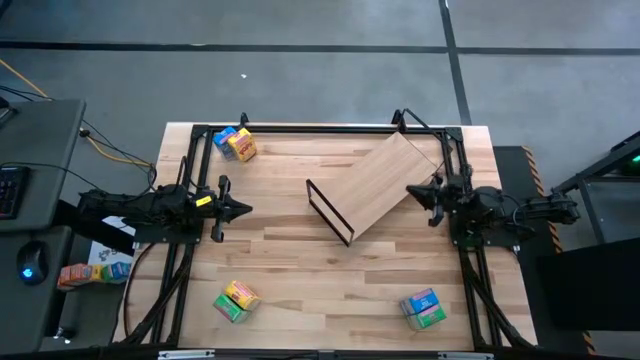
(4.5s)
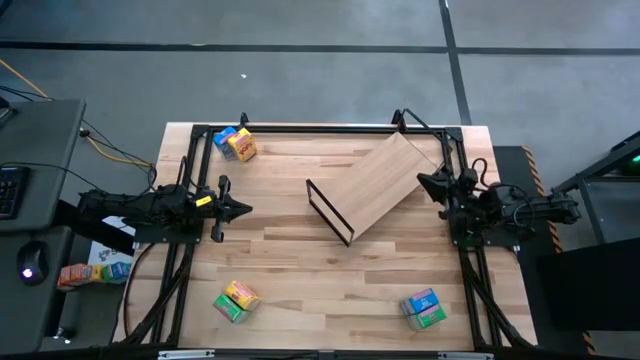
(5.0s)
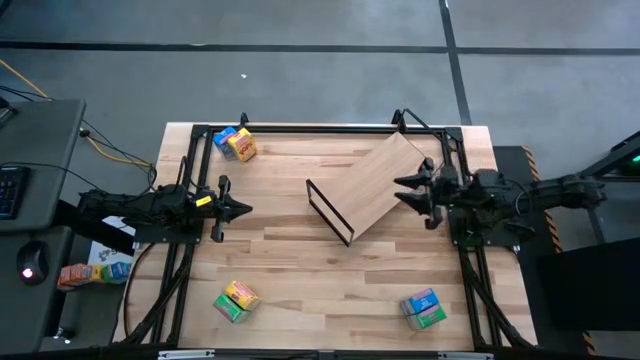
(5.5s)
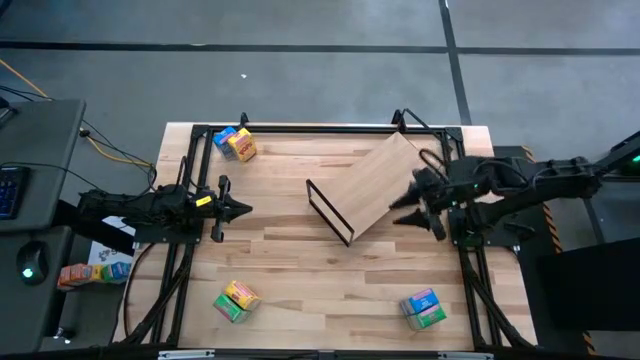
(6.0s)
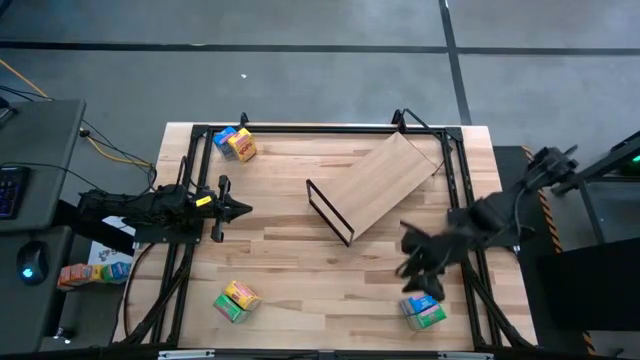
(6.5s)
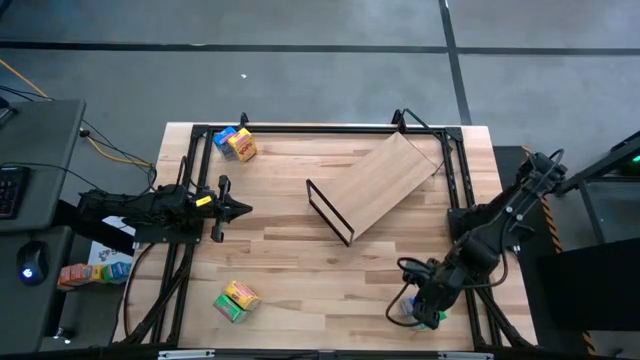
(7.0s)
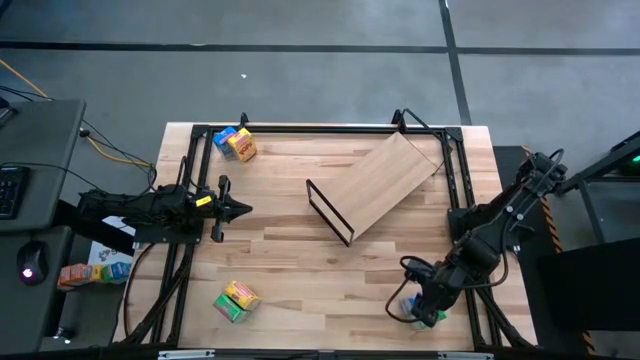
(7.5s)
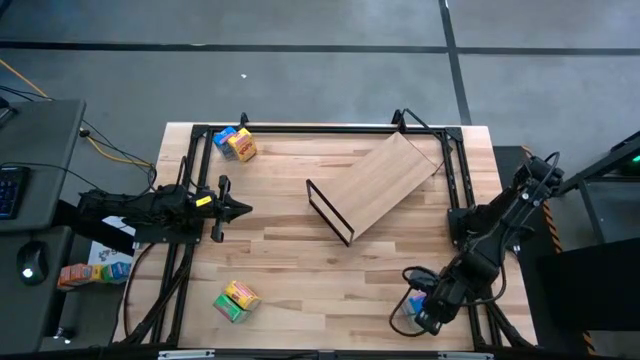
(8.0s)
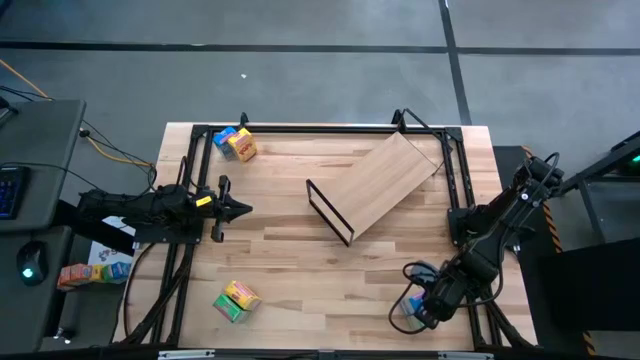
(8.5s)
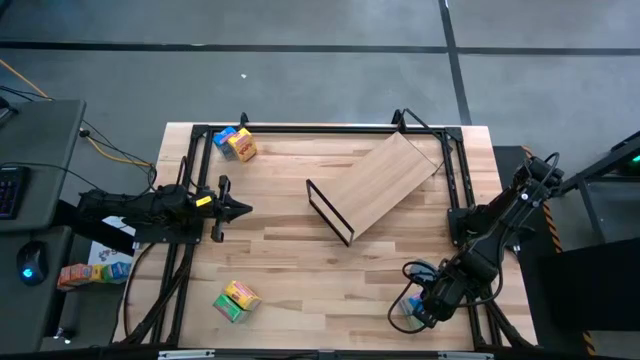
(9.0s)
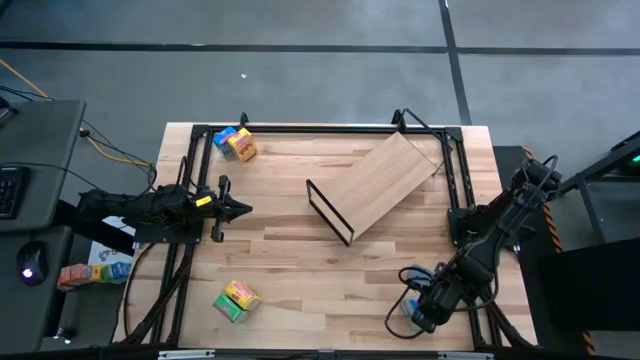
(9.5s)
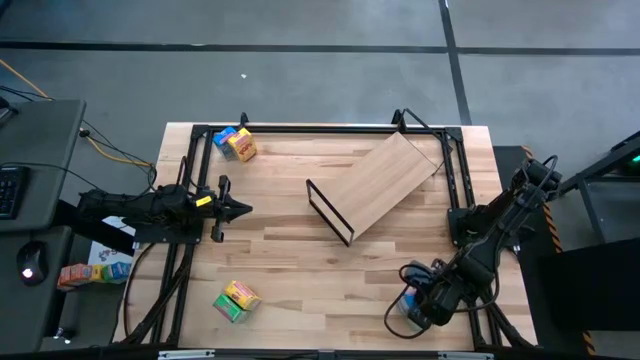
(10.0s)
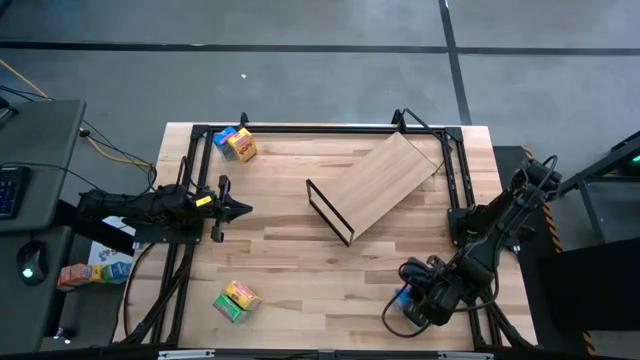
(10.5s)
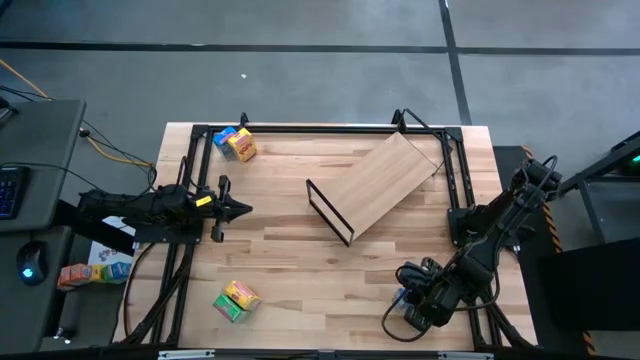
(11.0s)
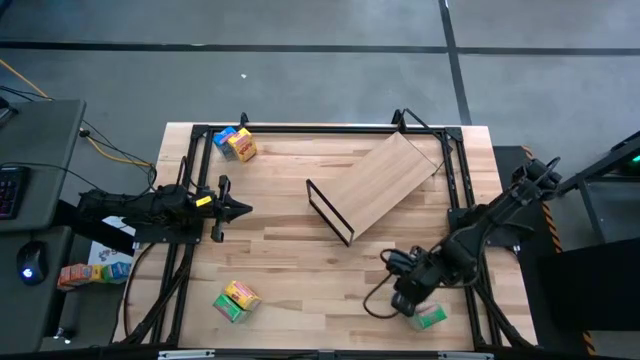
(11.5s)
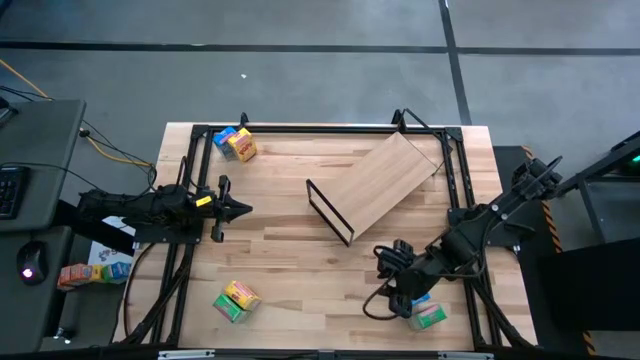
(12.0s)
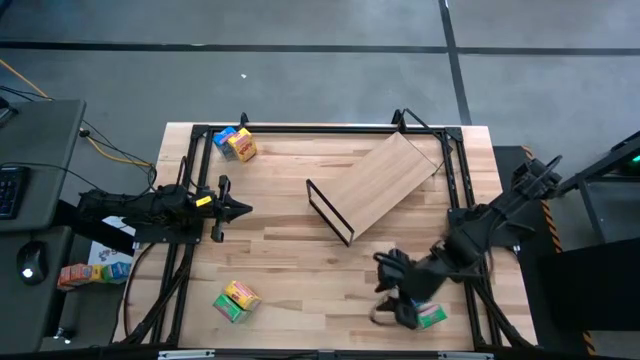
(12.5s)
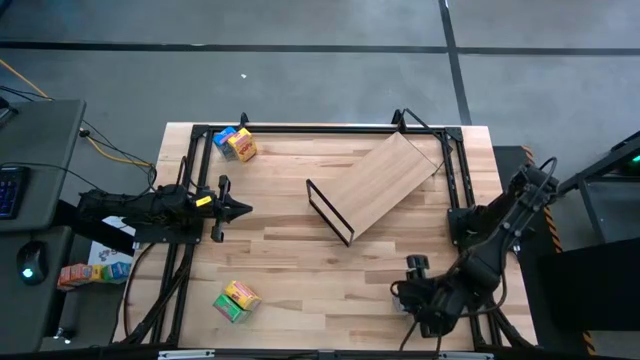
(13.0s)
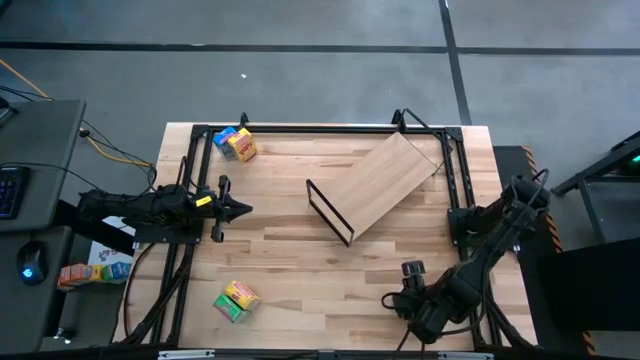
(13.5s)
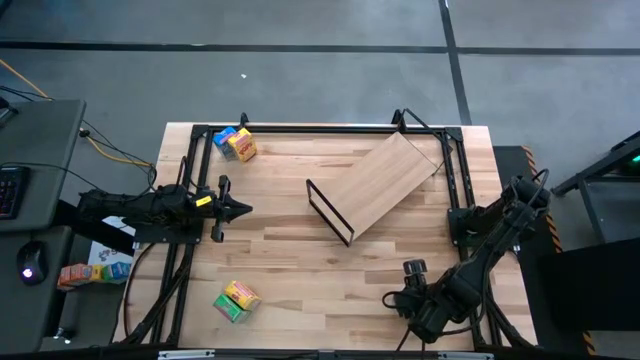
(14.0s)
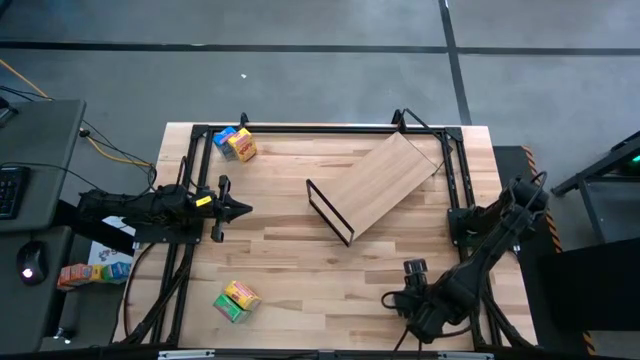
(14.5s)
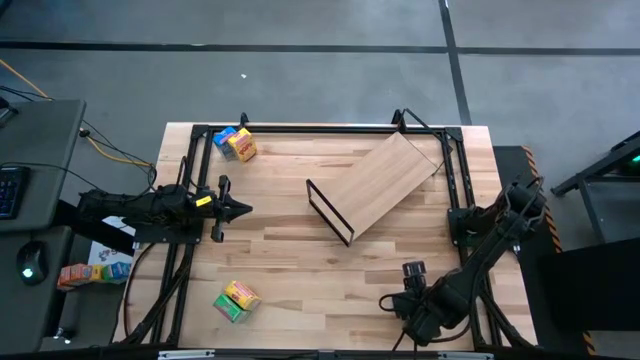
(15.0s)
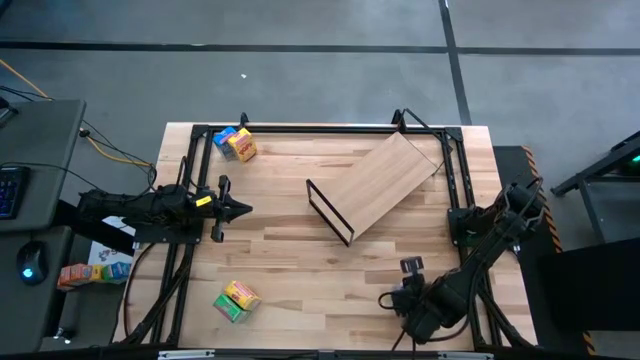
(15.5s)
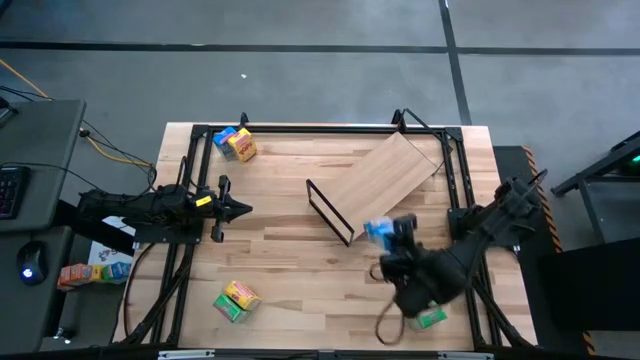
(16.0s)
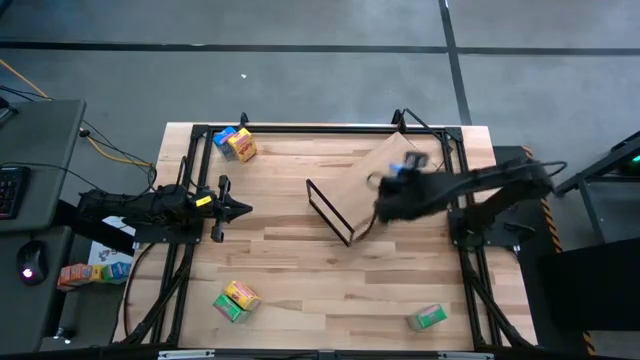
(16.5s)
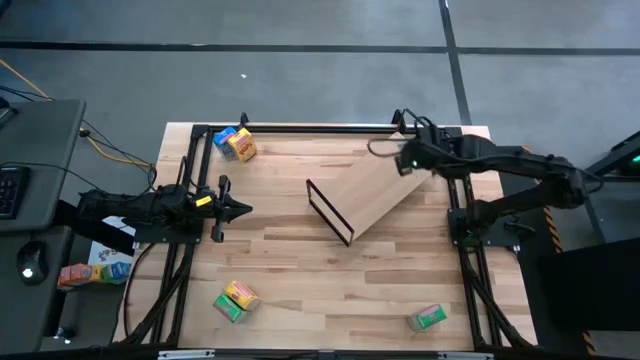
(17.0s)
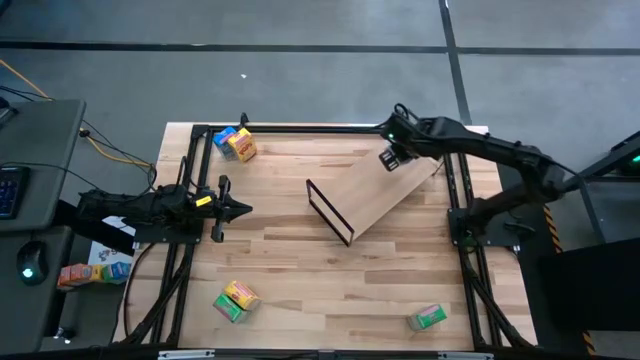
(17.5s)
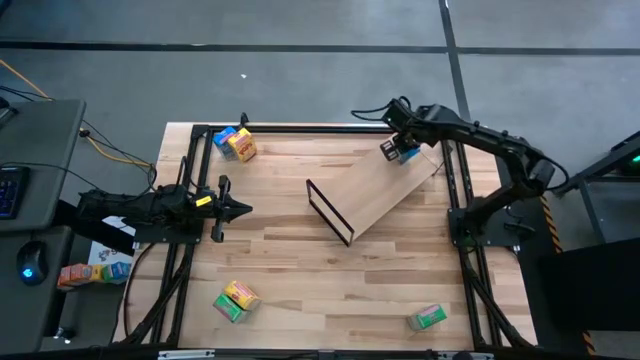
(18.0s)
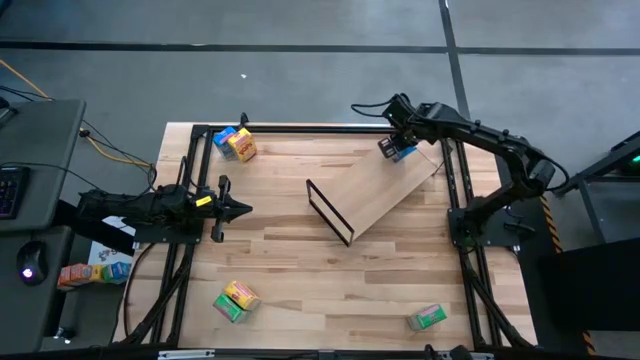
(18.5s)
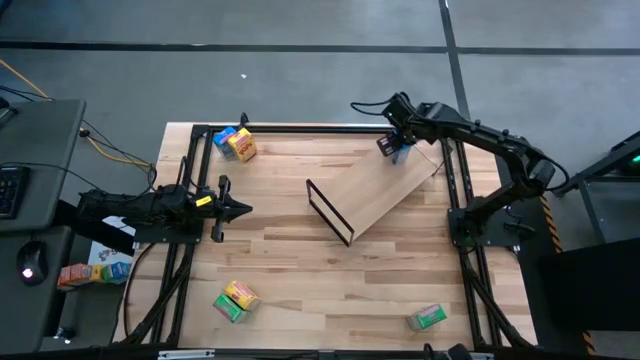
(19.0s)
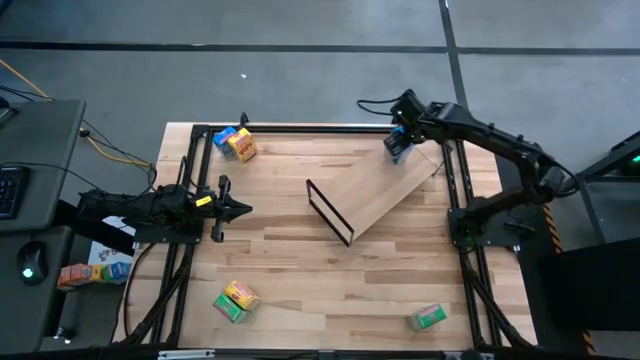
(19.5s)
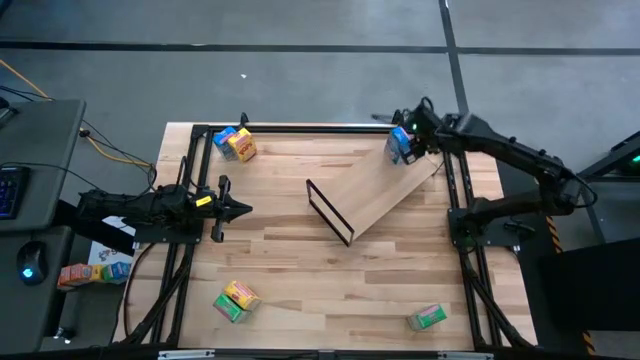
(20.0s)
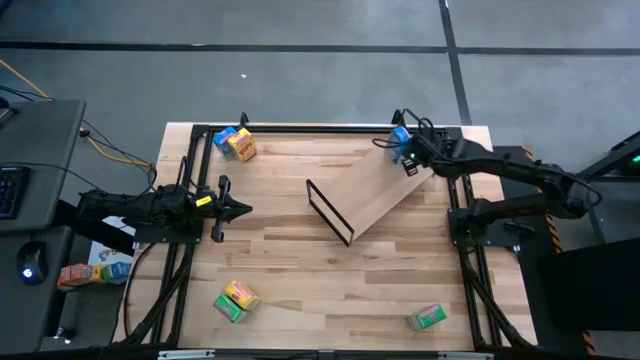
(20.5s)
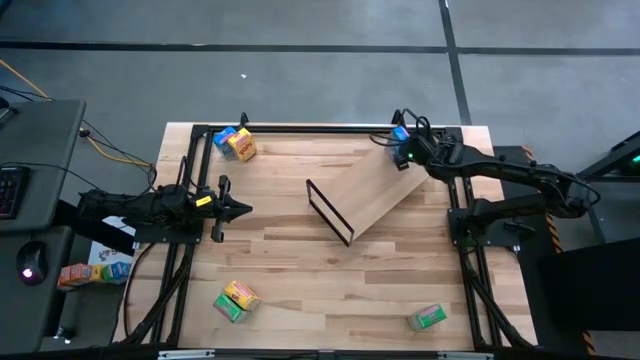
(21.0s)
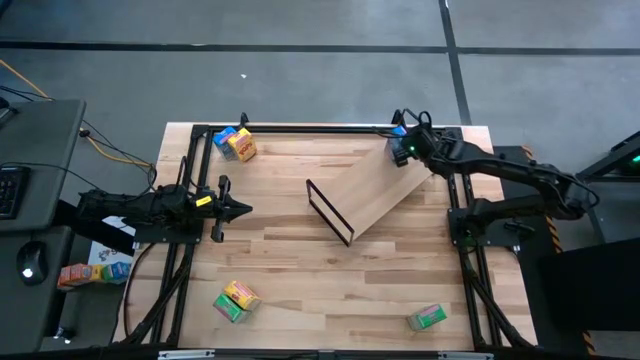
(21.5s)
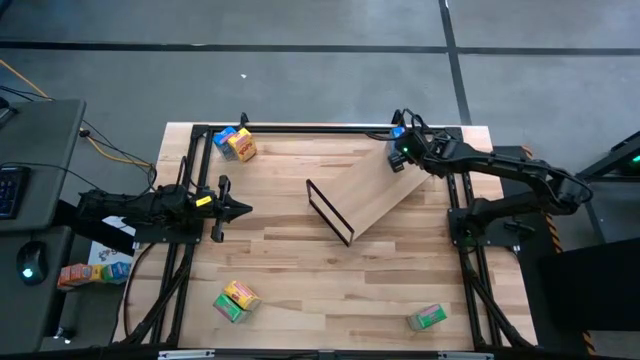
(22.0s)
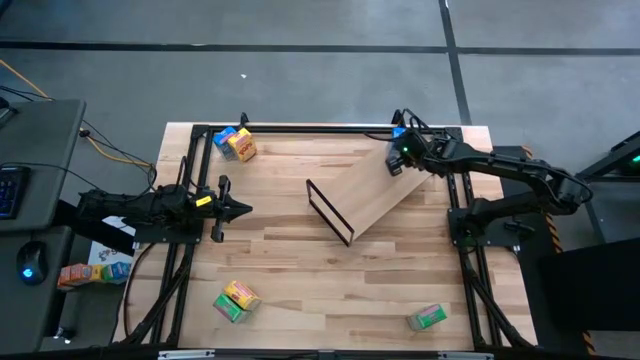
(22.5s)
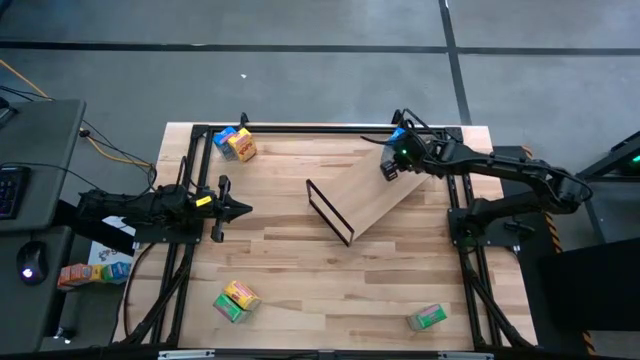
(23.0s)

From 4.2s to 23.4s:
Task: Stack cereal on shelf
Put the bottom blue cereal box on the shelf
